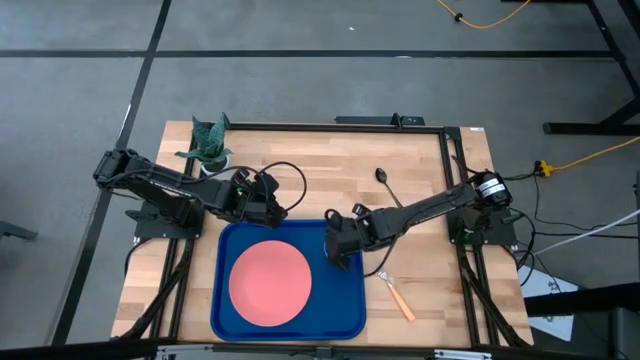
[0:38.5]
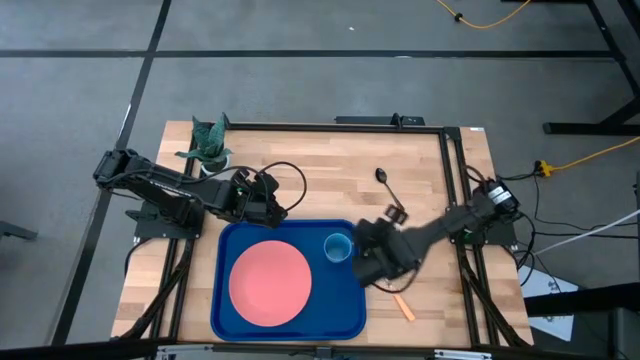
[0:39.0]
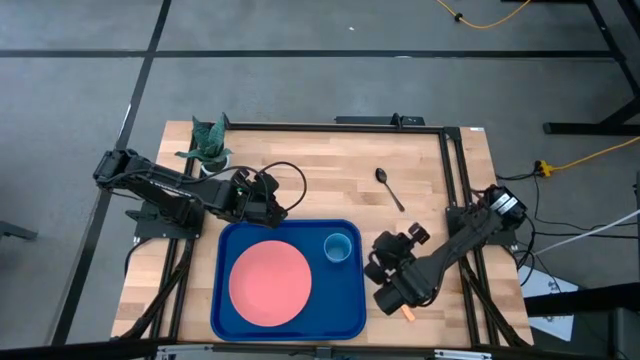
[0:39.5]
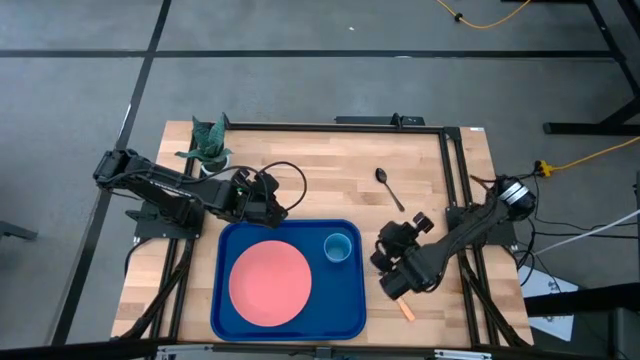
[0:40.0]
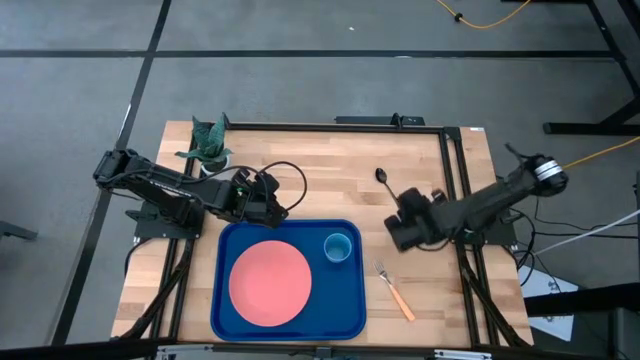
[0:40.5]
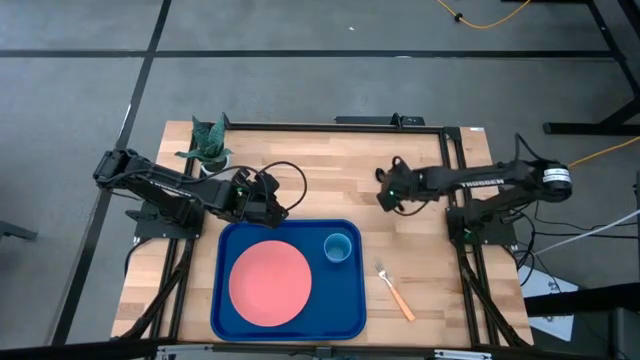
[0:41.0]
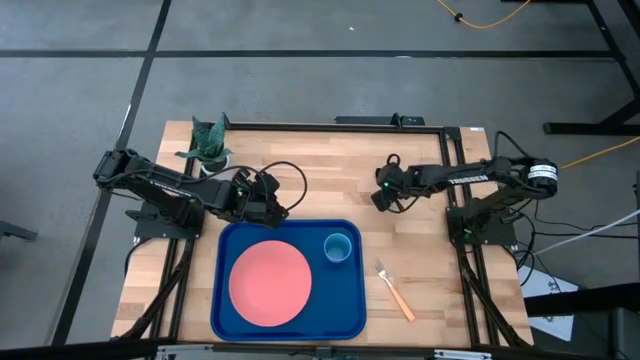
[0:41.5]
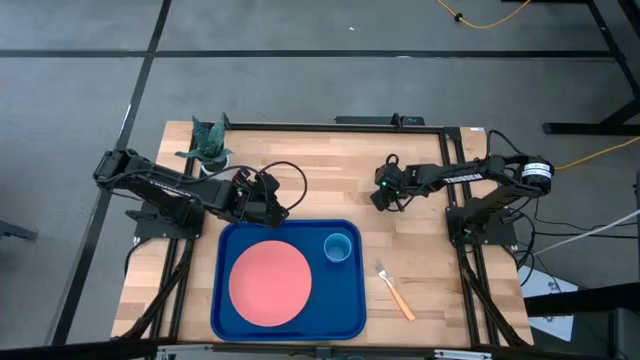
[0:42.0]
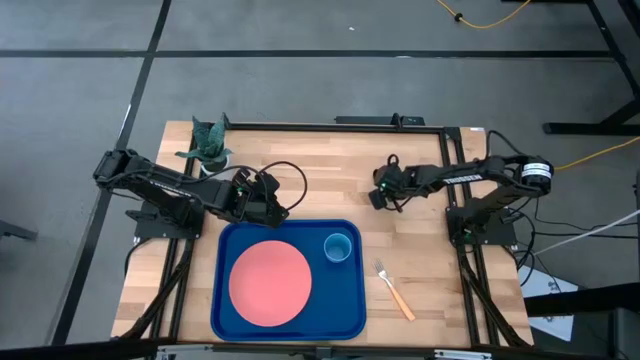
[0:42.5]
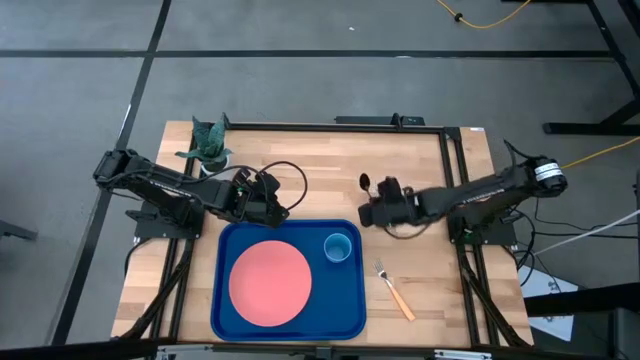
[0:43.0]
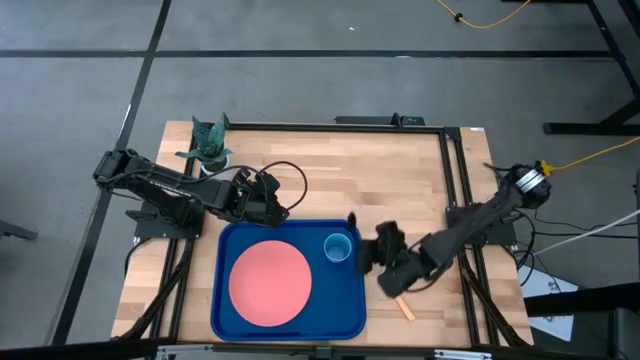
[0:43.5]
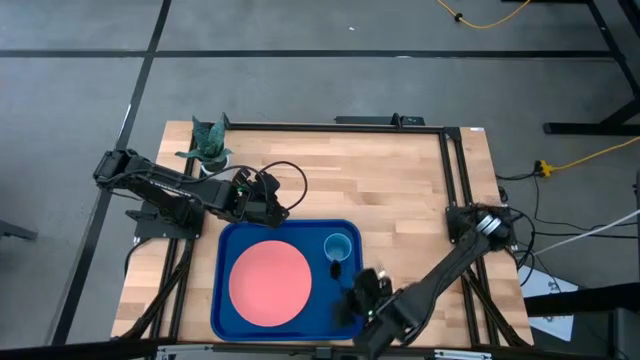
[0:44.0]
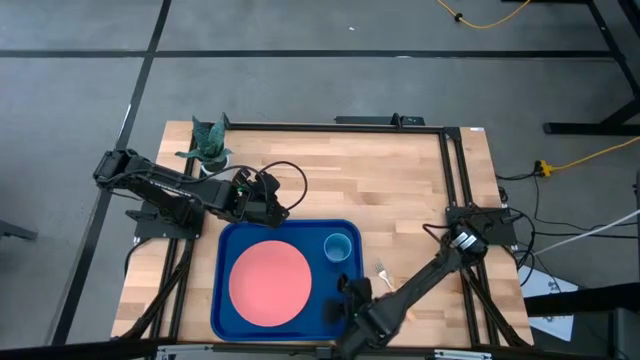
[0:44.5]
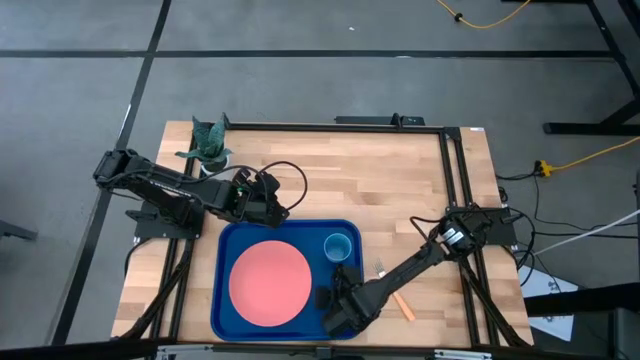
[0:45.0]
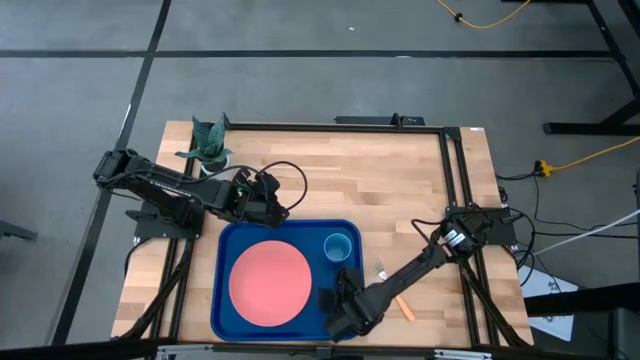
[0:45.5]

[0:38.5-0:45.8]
Task: Pick and place plate/cup/fork/spoon on tray
Put the black spoon on the blue serving tray to the bottom of the blue cup

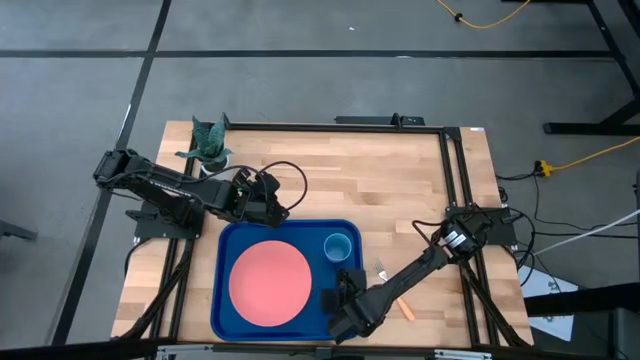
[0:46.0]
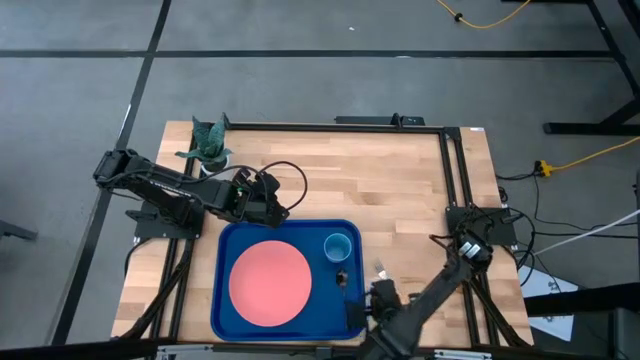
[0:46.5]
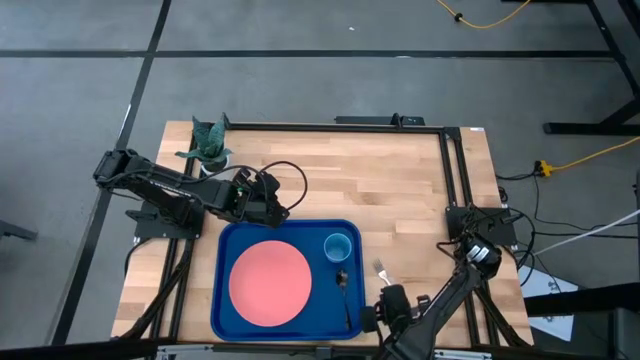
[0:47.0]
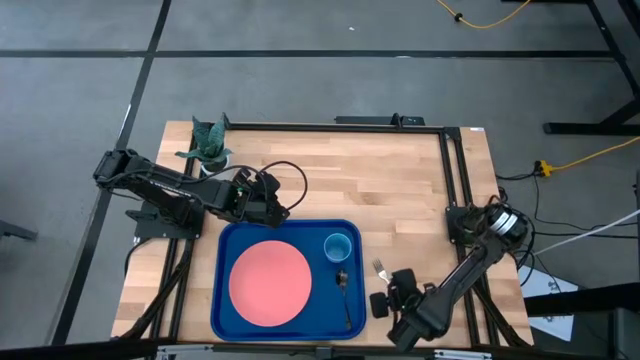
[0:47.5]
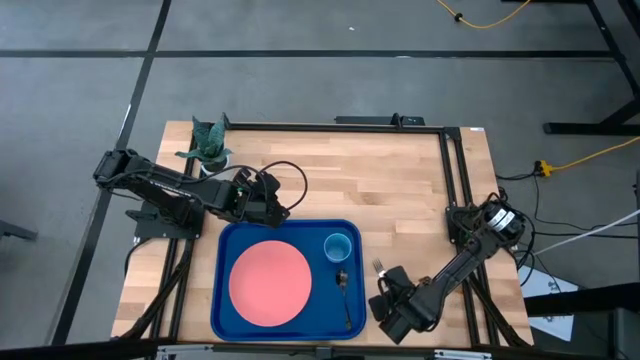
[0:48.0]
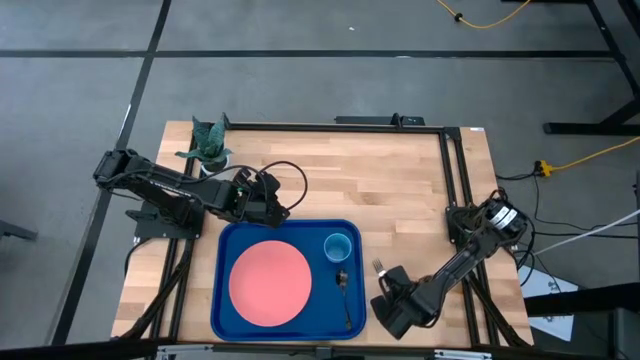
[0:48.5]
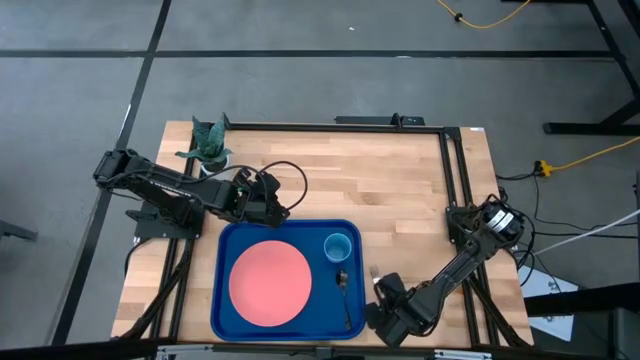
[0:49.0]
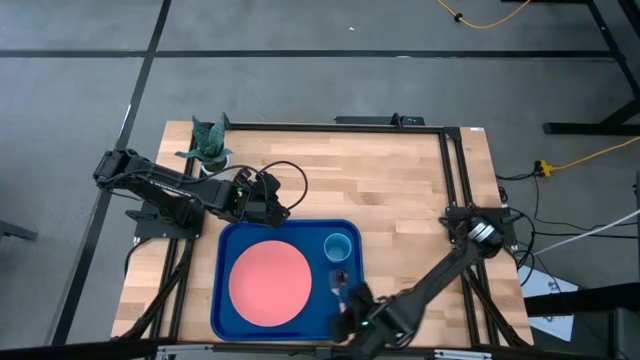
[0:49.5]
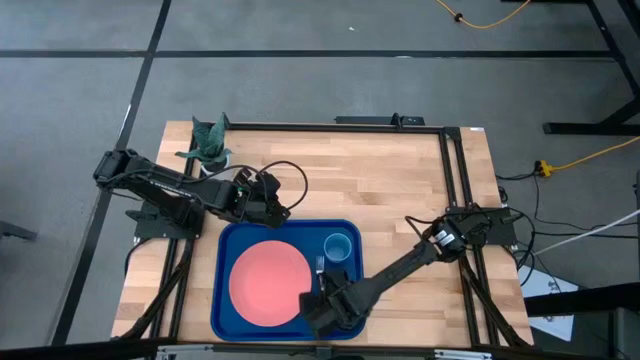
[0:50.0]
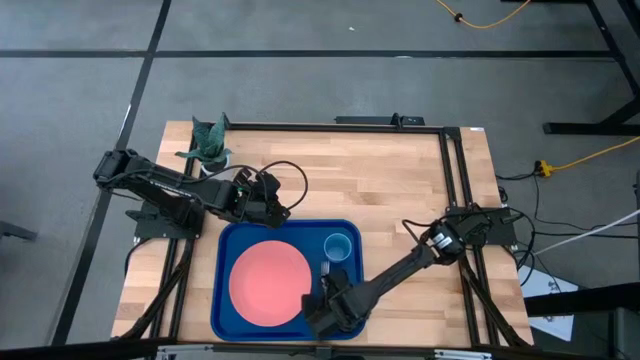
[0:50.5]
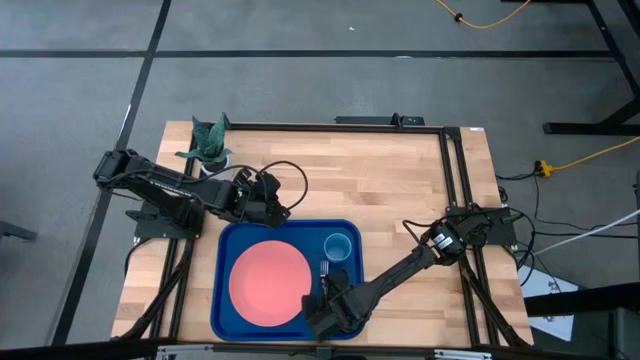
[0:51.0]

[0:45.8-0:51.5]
Put the orange fork on the blue serving tray to the left of the black spoon
